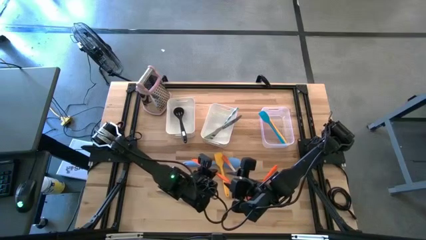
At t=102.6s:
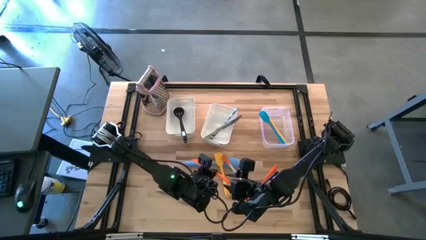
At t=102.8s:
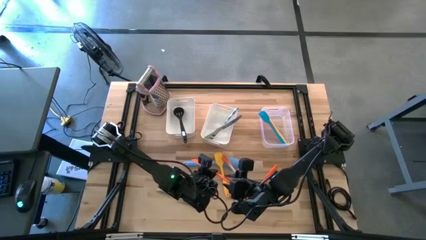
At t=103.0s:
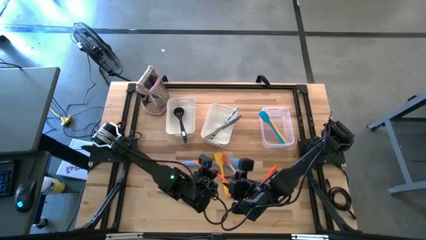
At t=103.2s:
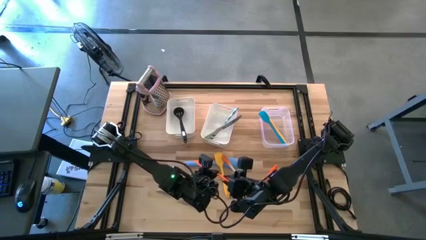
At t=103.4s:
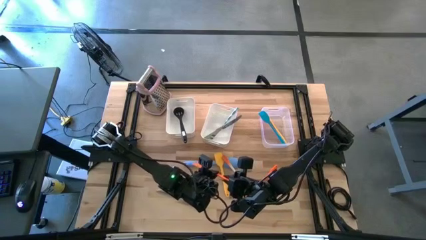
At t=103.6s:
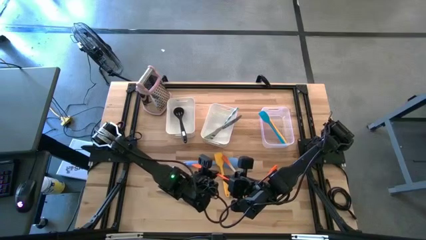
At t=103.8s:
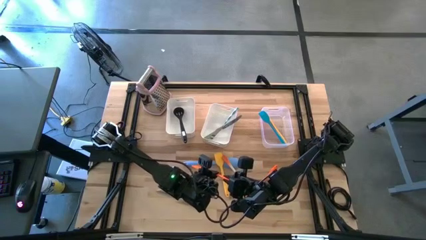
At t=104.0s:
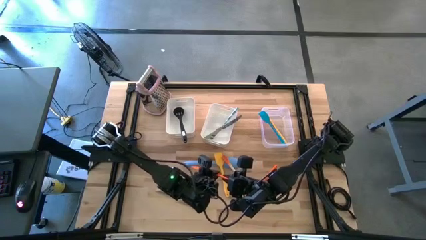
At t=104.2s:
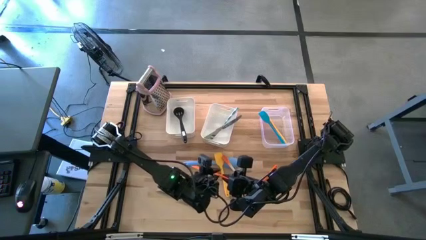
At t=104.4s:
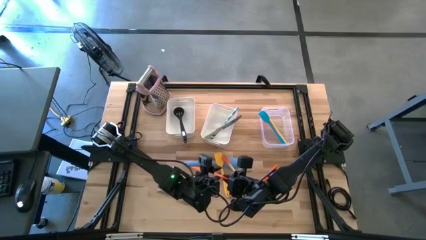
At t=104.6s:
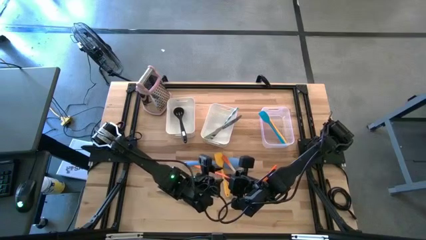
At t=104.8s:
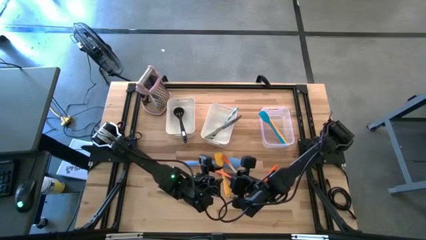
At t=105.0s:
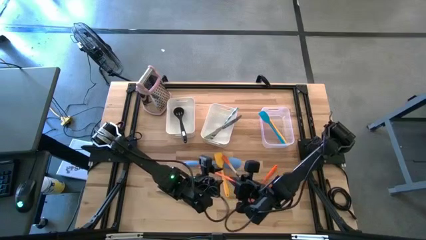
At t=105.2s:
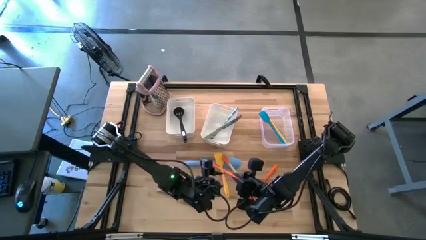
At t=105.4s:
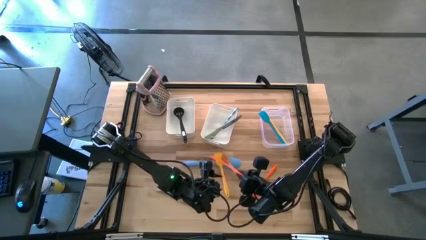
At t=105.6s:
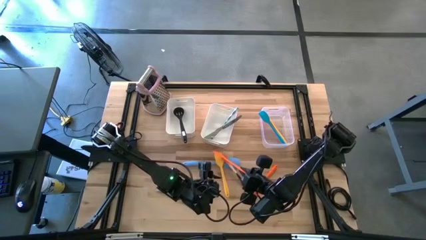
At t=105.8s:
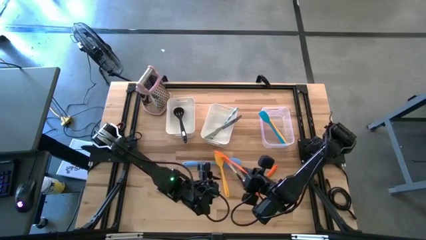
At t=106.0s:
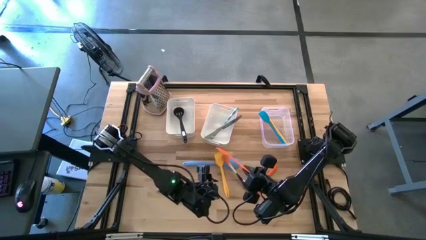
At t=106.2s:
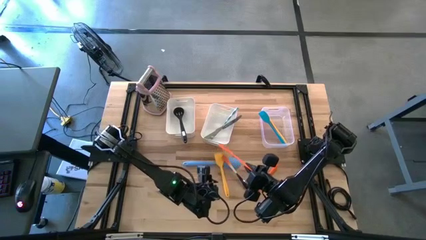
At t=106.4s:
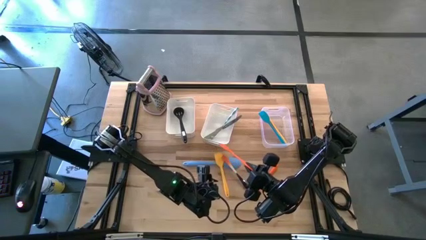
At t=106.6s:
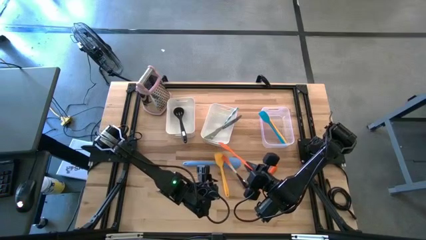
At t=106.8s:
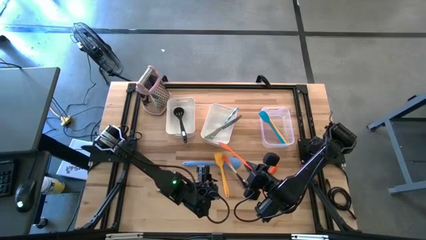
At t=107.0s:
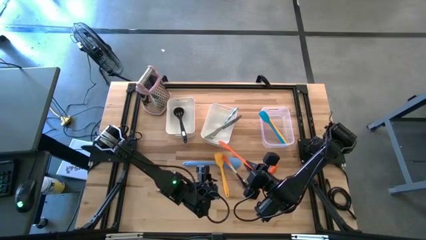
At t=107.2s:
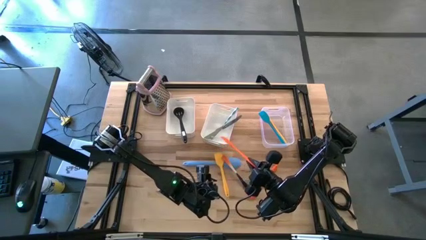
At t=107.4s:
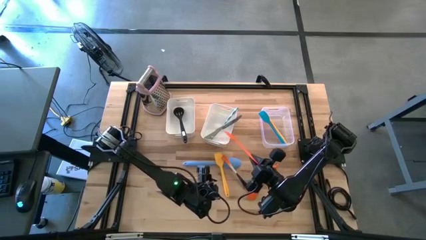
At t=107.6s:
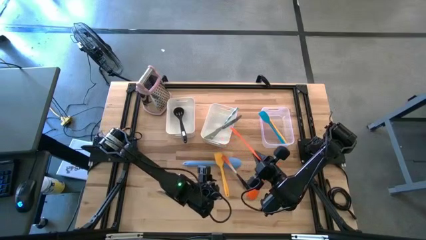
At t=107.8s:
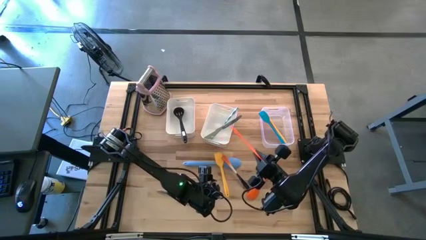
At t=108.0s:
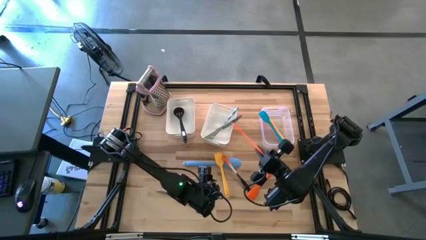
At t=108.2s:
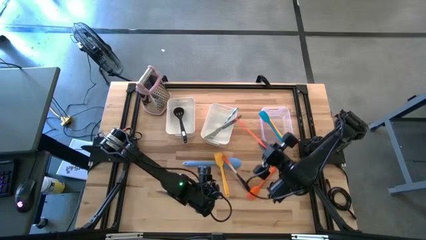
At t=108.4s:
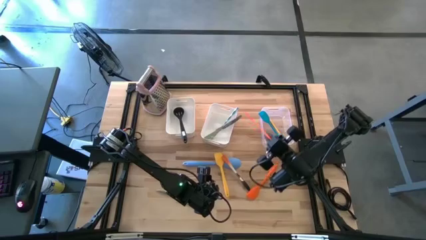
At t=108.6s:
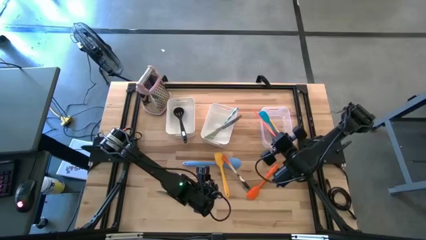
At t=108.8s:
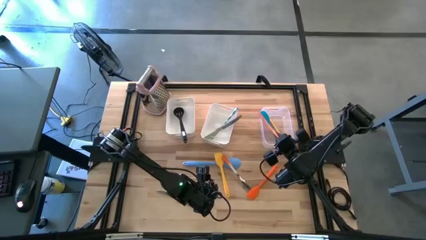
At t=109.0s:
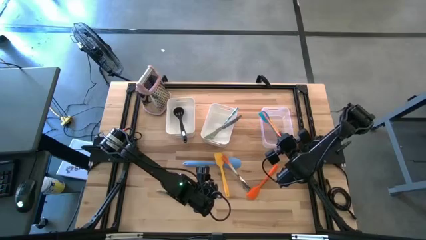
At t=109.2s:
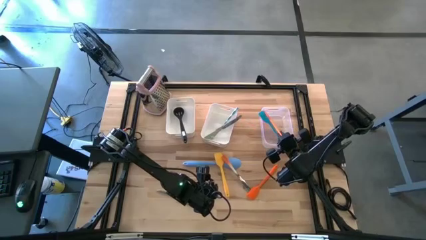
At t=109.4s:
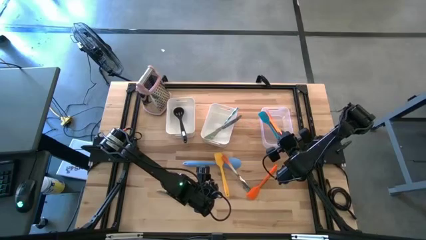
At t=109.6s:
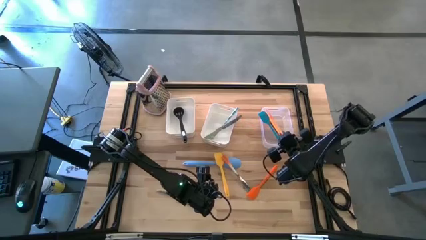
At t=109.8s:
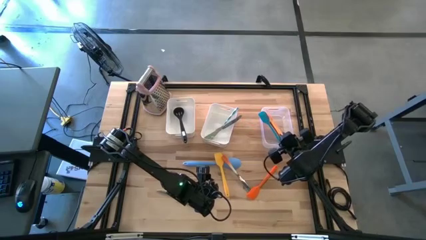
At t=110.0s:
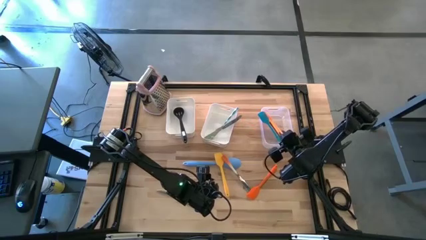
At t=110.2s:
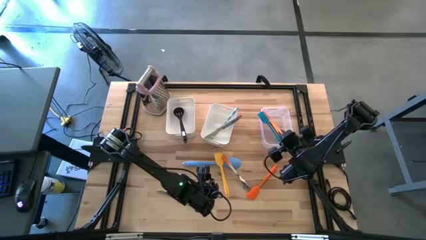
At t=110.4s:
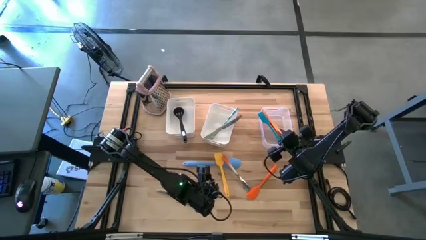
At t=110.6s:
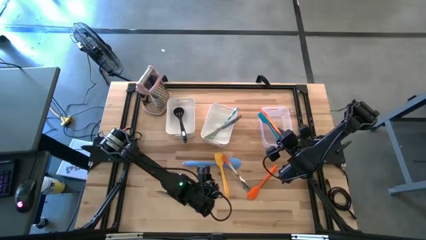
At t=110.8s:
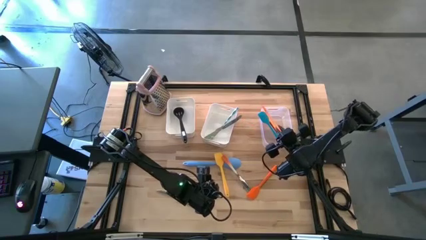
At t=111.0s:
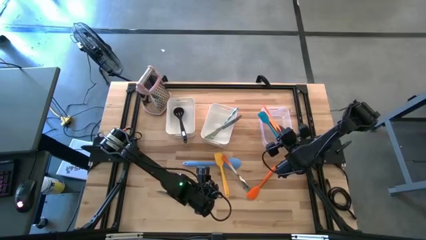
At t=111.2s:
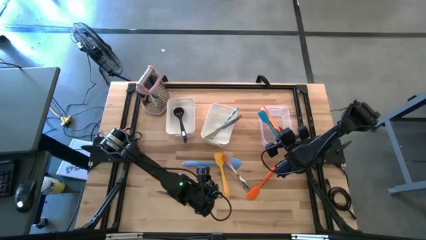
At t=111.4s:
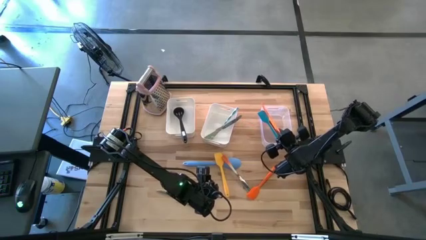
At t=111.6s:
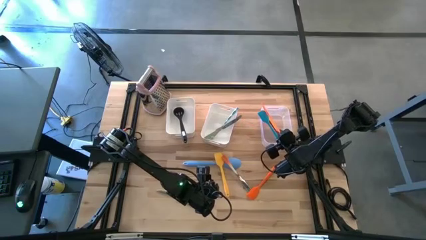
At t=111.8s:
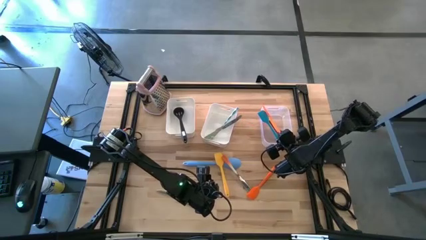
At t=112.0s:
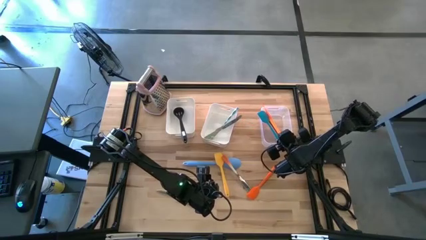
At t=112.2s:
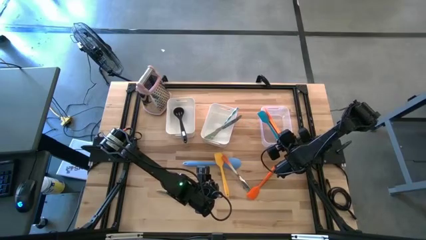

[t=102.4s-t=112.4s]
Task: Pick & Place Kitchen Items
Put the right orange spatula into the transparent bin
